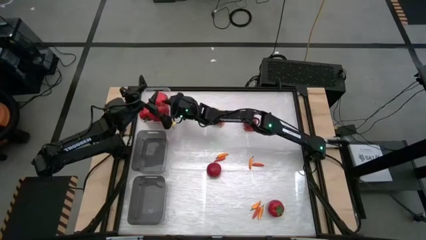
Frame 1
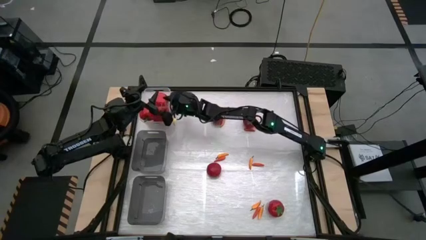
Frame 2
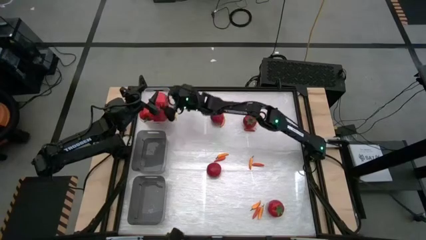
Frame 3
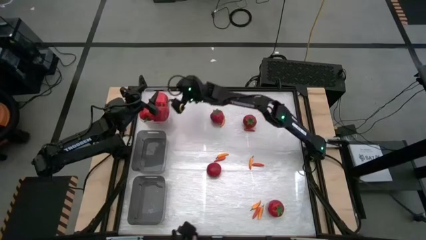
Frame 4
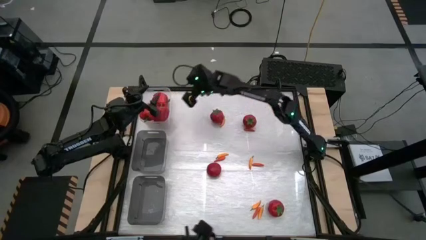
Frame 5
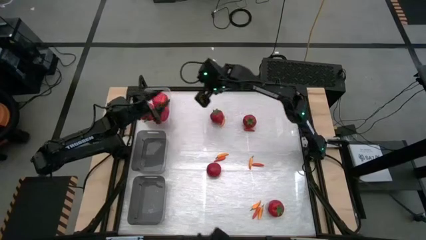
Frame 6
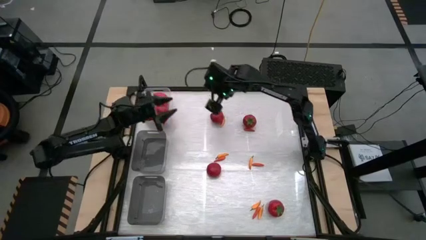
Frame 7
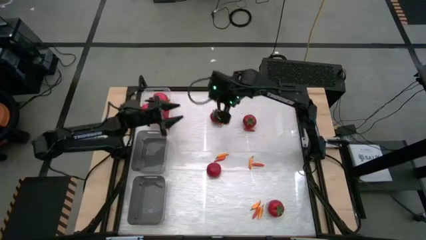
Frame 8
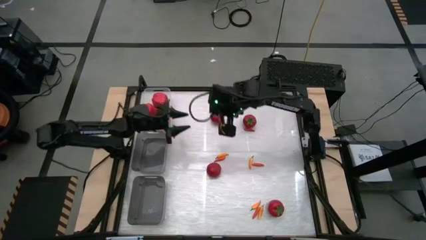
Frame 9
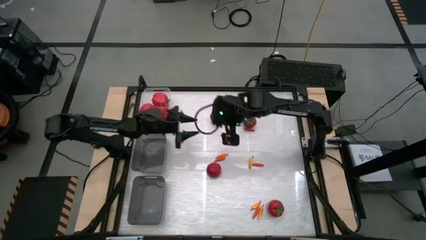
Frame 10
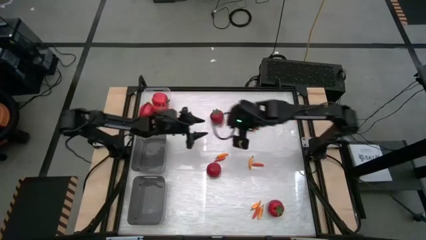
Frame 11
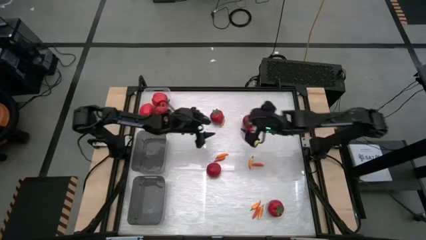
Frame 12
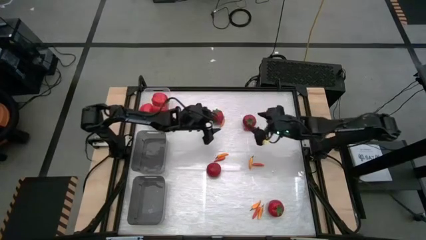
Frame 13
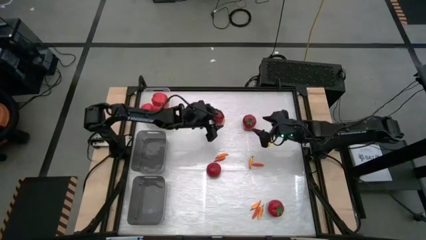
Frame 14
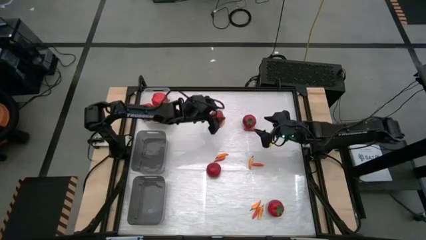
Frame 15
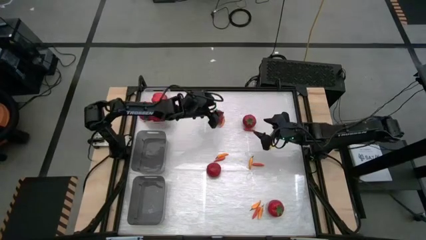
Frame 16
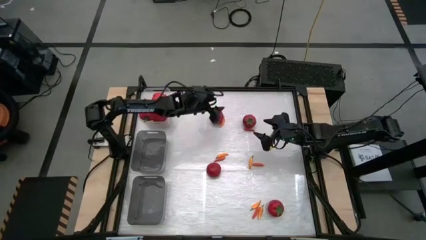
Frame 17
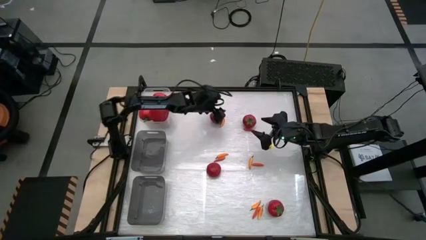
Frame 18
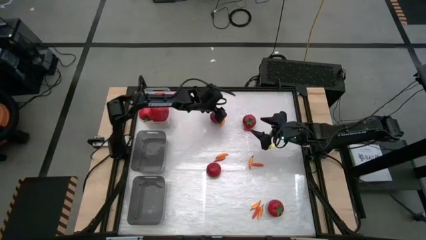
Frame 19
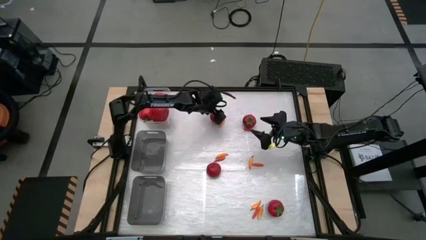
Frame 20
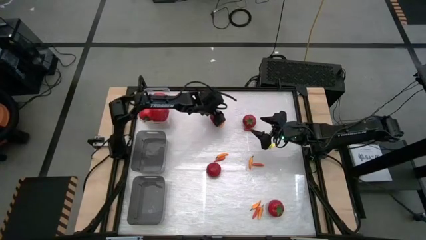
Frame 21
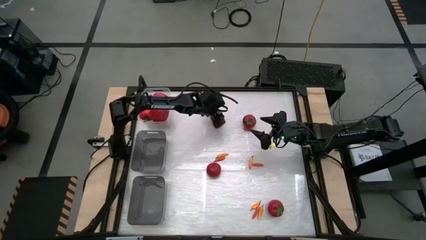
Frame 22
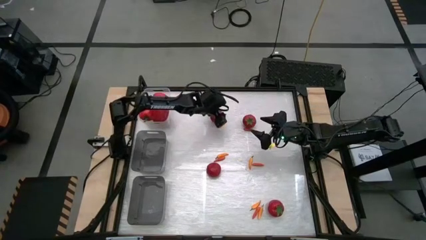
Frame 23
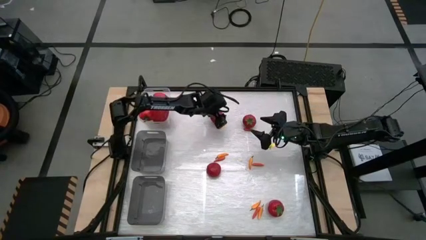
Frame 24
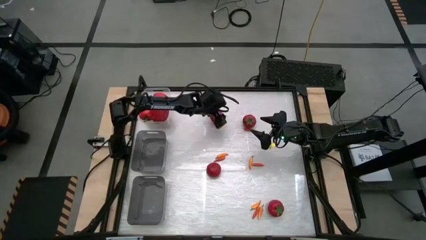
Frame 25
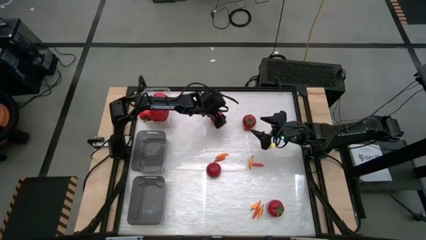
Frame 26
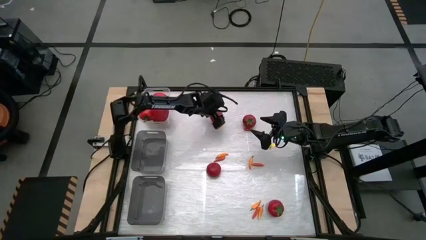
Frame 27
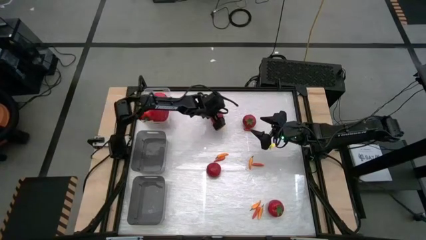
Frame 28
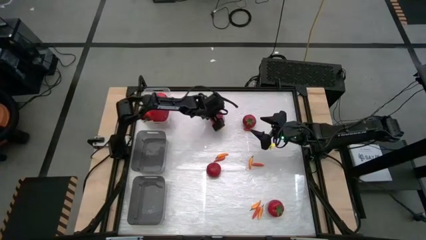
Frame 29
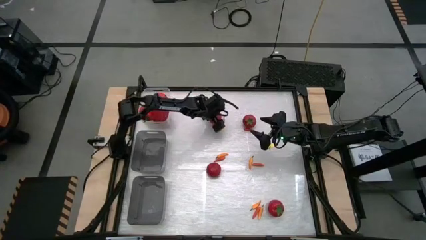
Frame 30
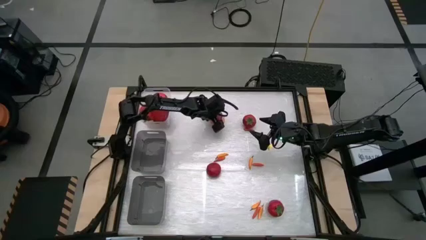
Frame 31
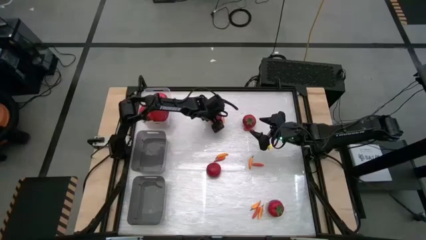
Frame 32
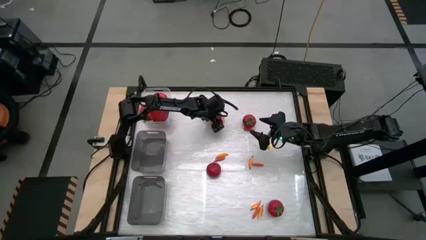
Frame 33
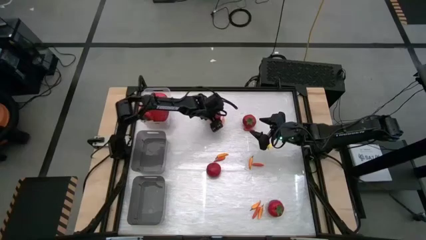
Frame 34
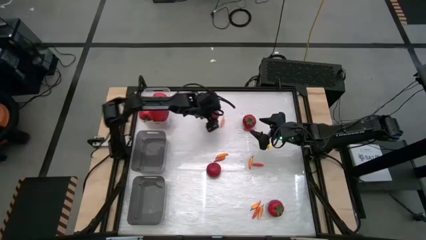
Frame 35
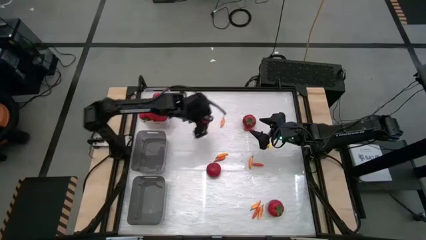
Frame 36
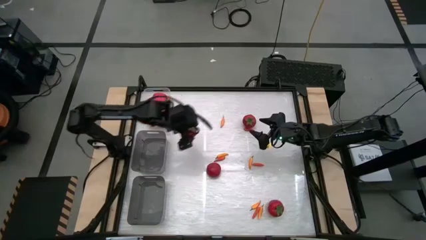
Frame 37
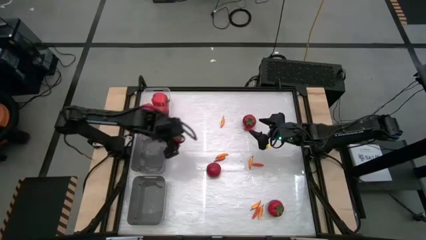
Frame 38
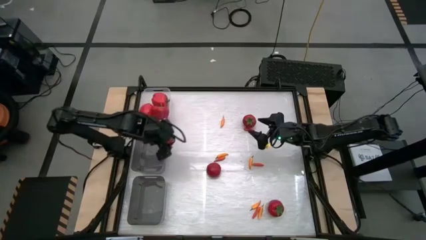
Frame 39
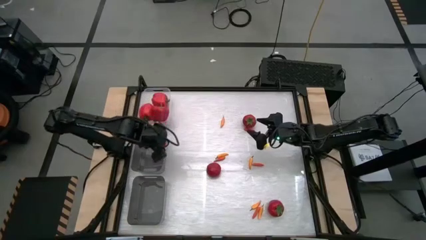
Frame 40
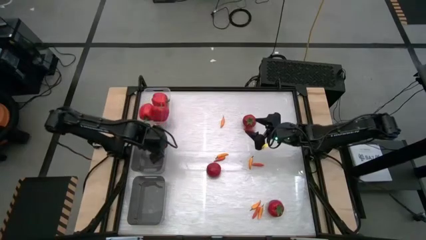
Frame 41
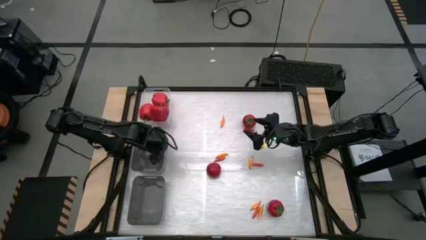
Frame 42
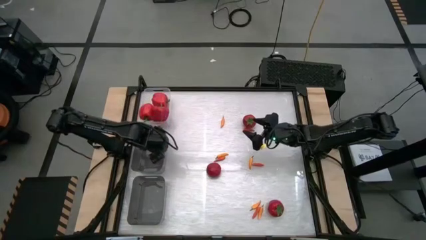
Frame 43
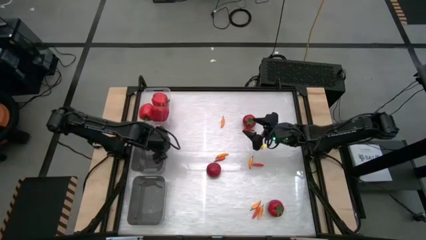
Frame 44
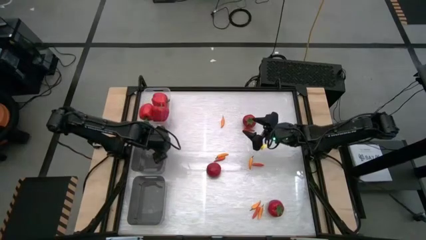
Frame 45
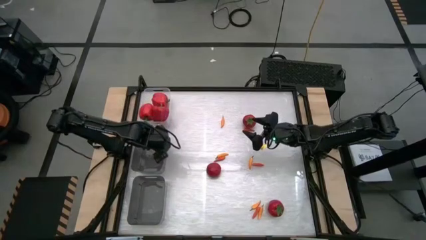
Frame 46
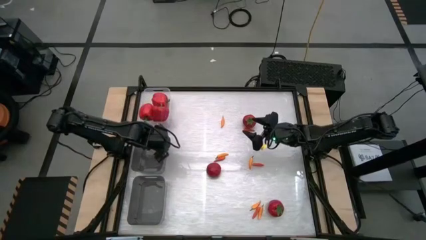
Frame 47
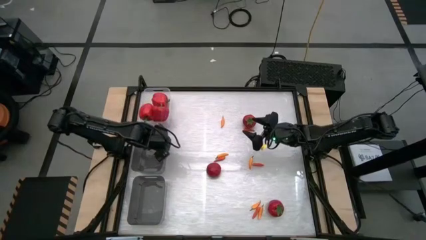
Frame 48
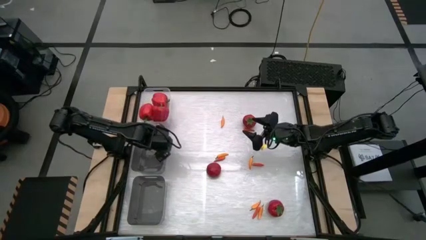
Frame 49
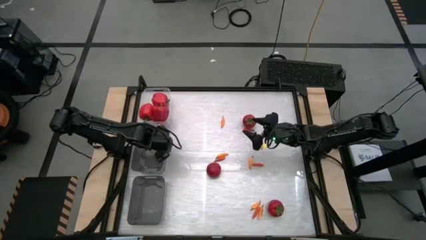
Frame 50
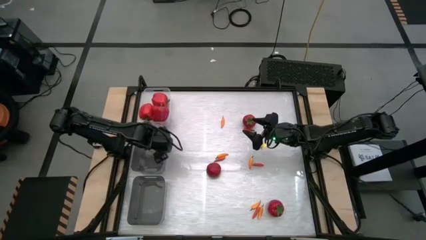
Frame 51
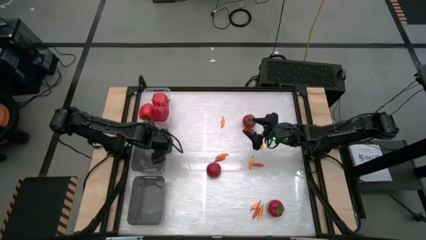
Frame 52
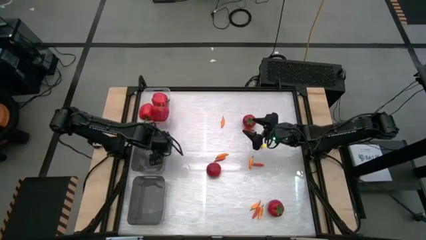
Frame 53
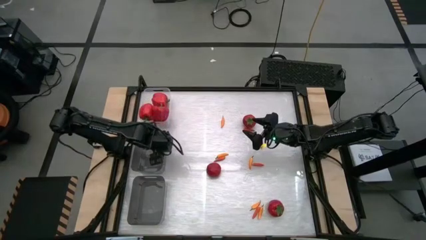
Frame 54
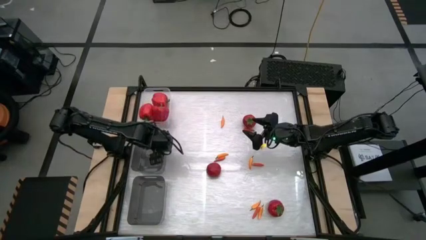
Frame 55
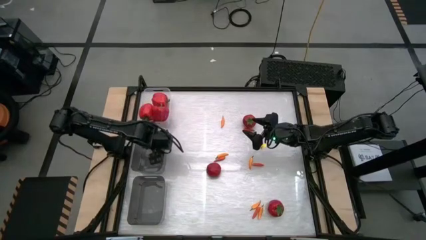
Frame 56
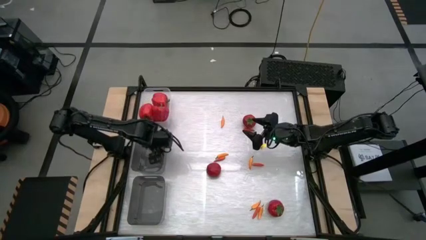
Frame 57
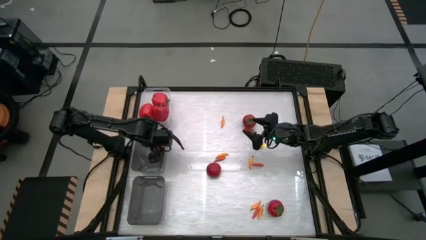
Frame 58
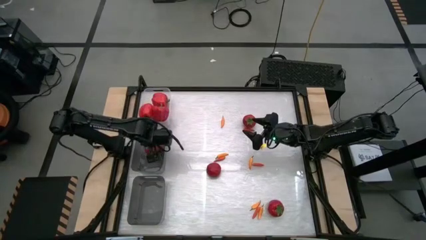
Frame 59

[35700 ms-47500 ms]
Task: Sort produce into baskets
Put the top center tomato into the top black transparent bin

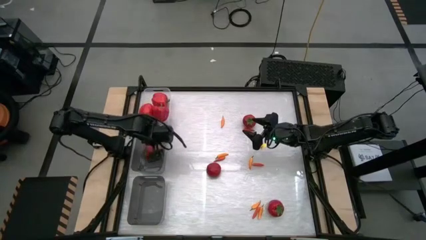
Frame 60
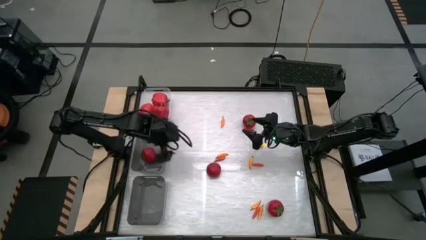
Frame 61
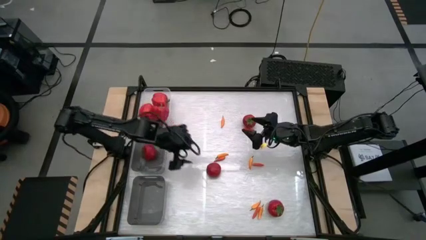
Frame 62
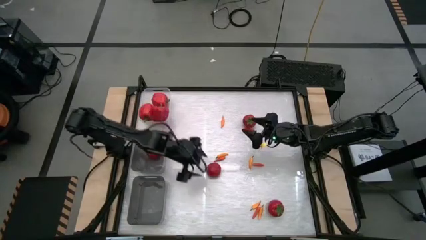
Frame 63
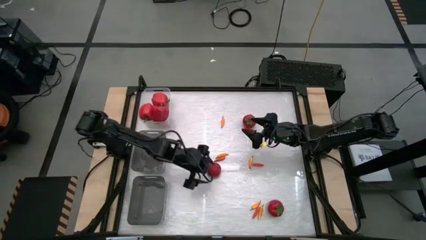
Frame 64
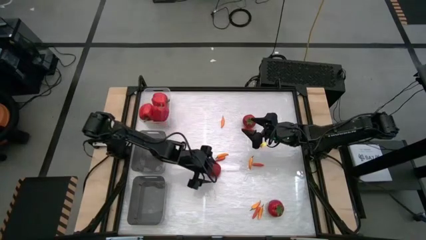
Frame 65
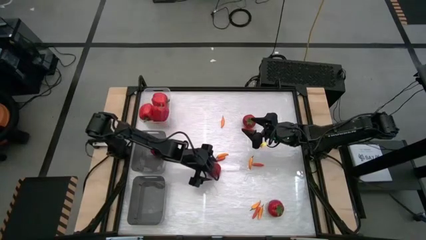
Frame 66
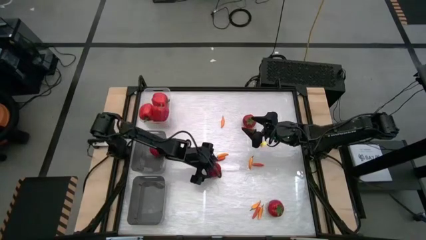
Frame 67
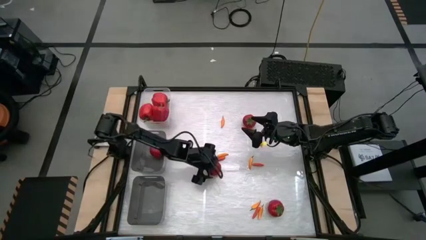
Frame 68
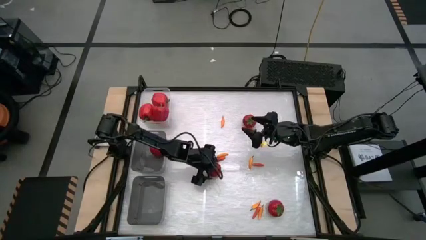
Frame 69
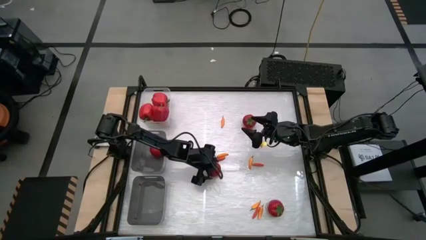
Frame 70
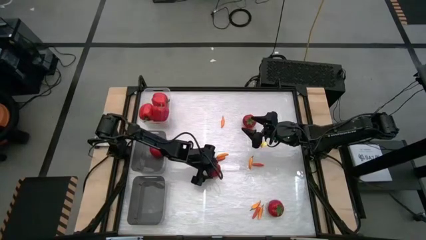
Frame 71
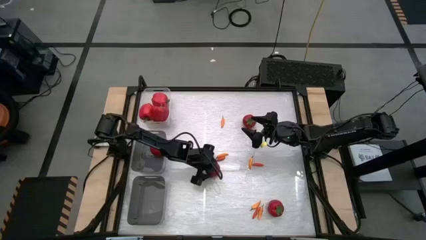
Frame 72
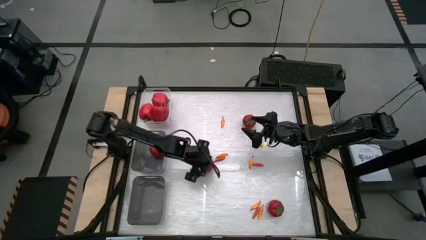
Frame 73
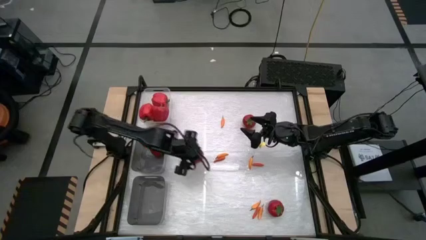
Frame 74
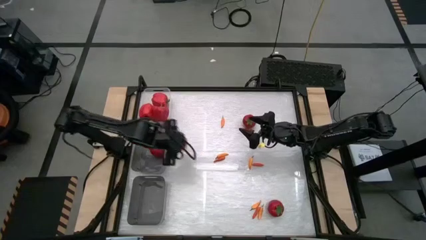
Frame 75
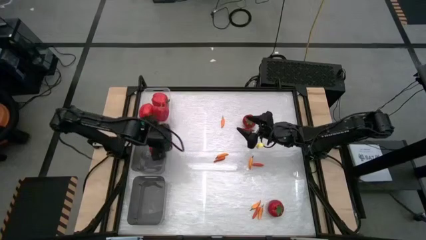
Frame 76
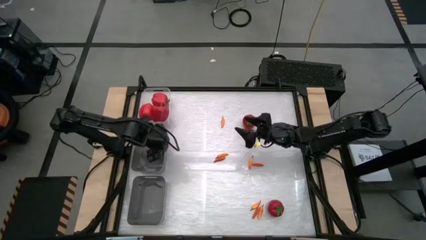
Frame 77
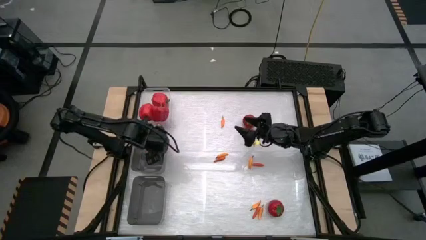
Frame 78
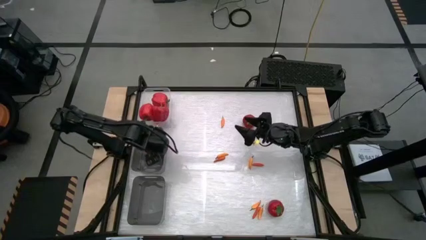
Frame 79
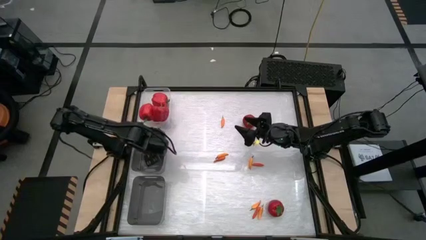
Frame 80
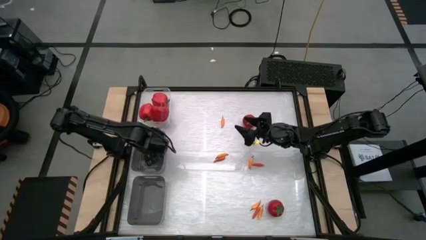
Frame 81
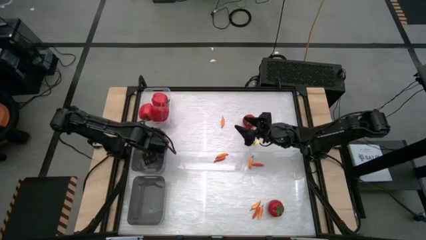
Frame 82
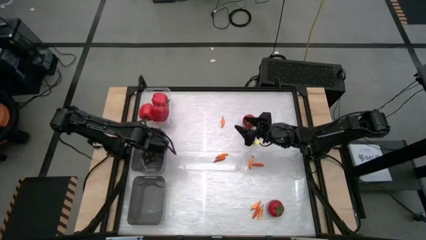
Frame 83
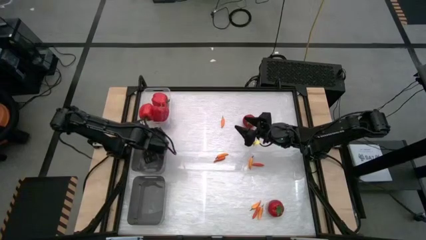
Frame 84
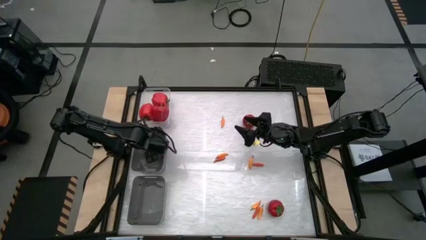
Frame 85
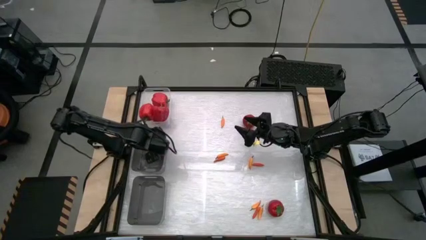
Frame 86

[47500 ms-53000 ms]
Put the center tomato into the top black transparent bin
